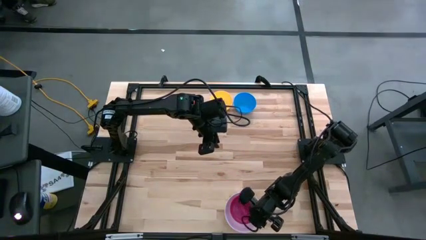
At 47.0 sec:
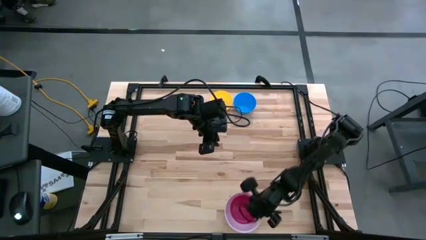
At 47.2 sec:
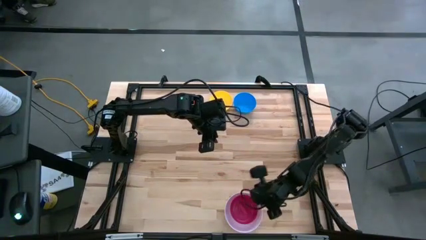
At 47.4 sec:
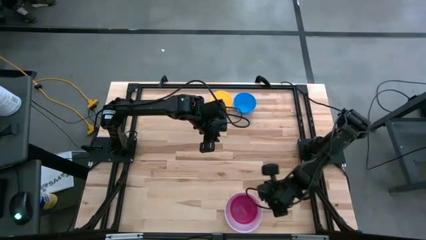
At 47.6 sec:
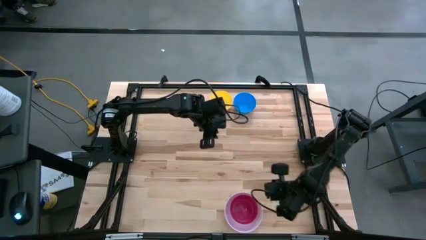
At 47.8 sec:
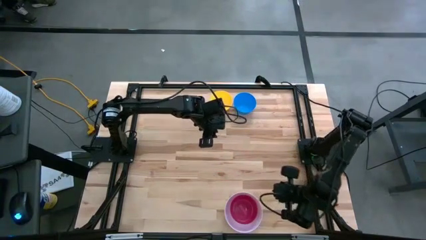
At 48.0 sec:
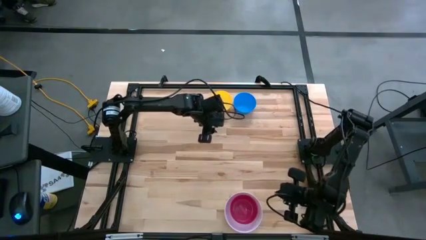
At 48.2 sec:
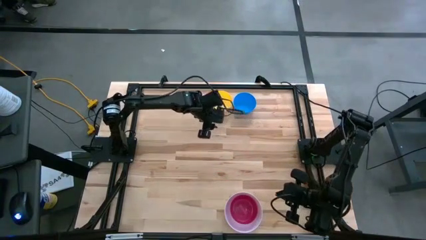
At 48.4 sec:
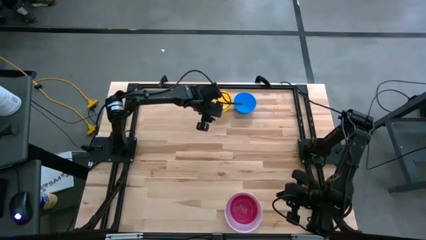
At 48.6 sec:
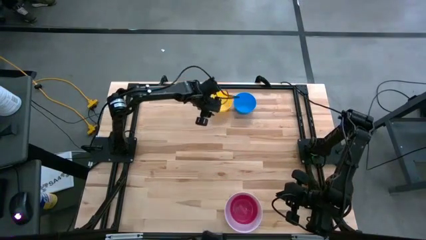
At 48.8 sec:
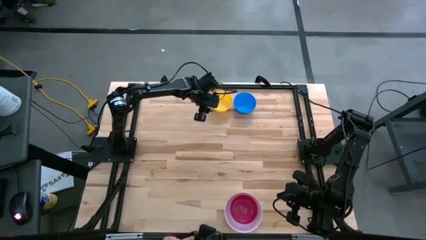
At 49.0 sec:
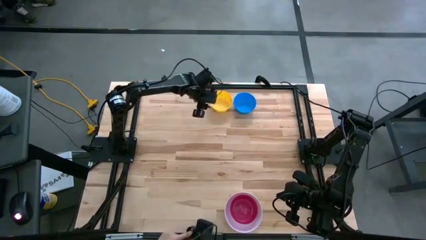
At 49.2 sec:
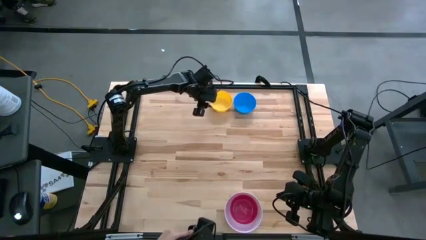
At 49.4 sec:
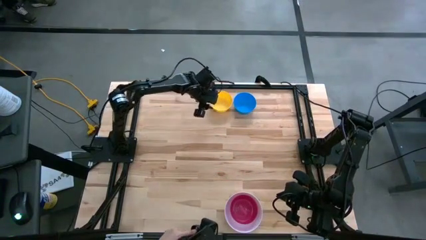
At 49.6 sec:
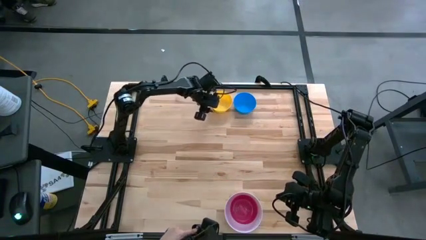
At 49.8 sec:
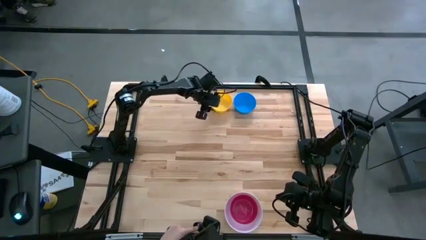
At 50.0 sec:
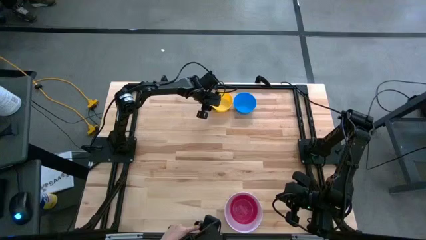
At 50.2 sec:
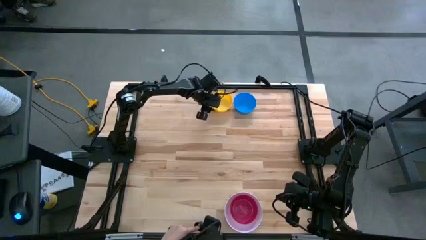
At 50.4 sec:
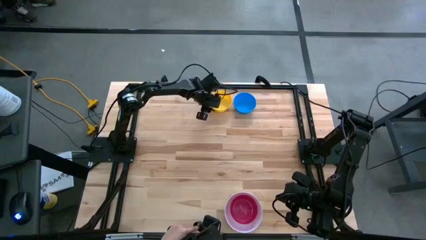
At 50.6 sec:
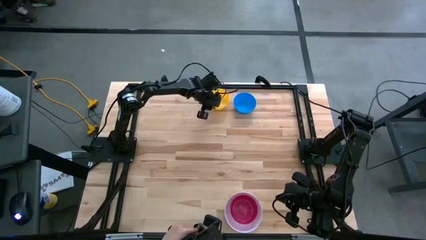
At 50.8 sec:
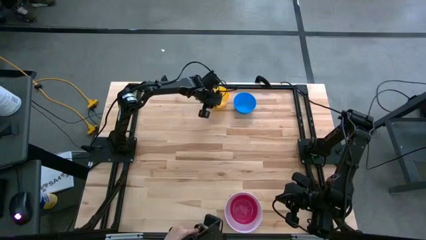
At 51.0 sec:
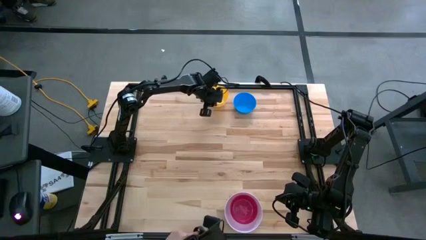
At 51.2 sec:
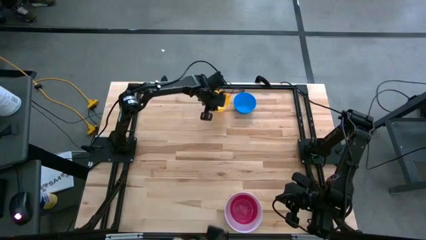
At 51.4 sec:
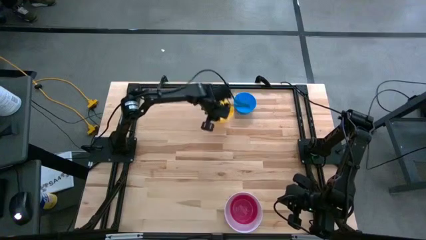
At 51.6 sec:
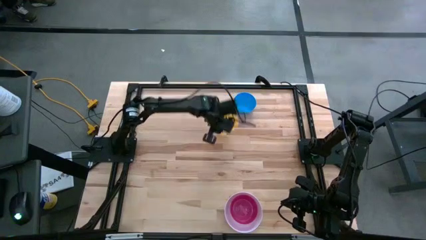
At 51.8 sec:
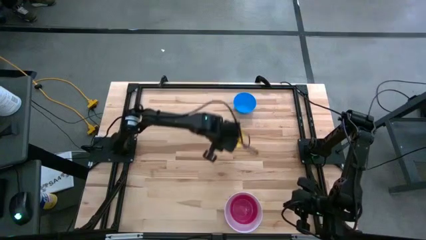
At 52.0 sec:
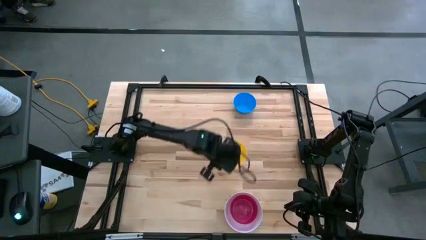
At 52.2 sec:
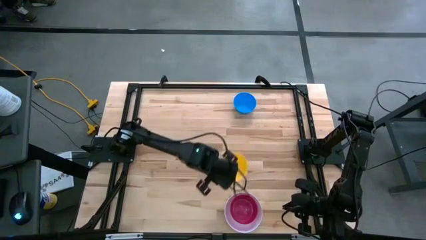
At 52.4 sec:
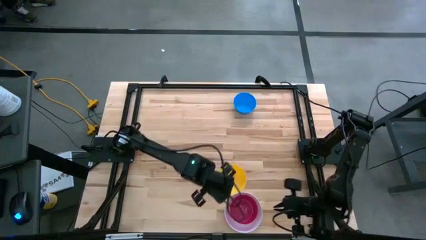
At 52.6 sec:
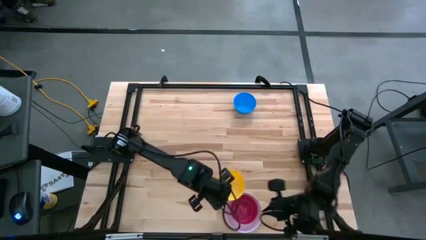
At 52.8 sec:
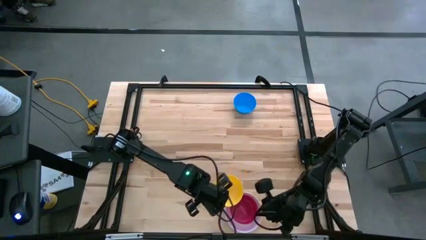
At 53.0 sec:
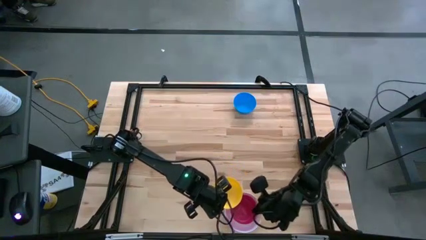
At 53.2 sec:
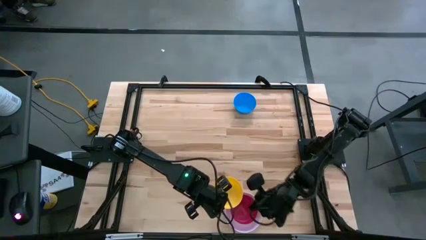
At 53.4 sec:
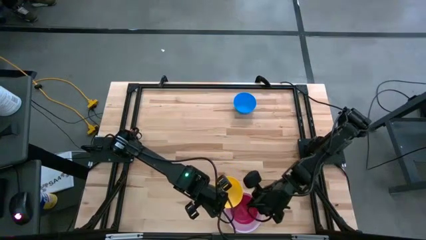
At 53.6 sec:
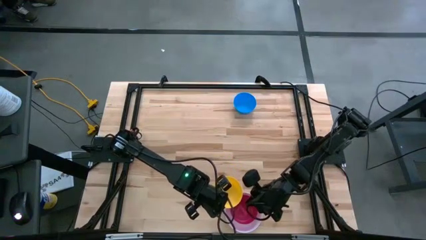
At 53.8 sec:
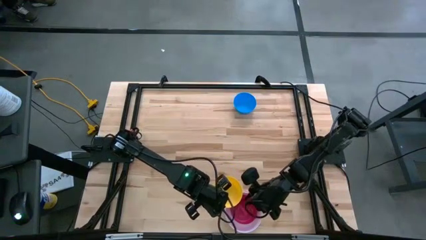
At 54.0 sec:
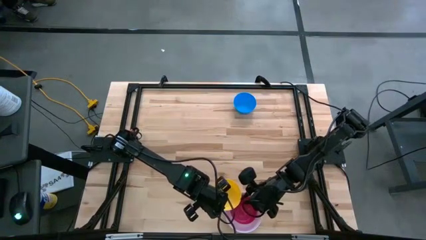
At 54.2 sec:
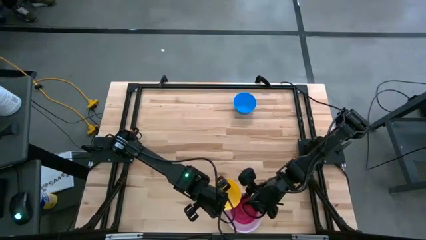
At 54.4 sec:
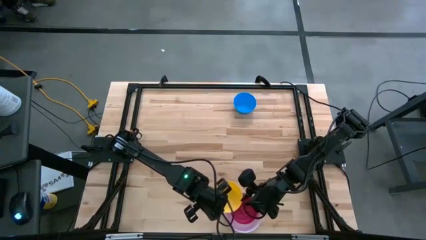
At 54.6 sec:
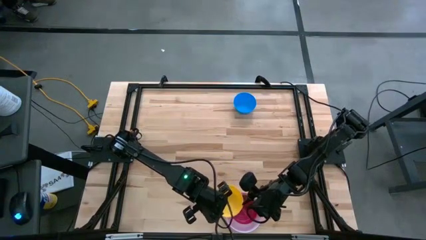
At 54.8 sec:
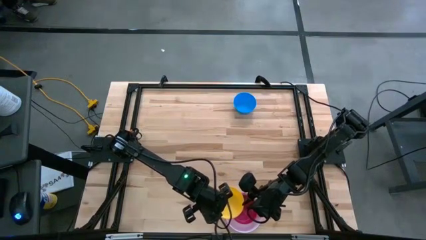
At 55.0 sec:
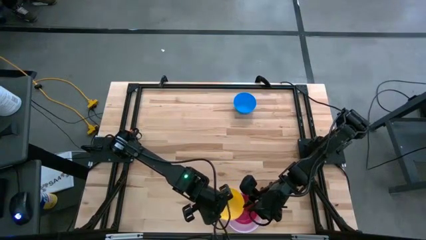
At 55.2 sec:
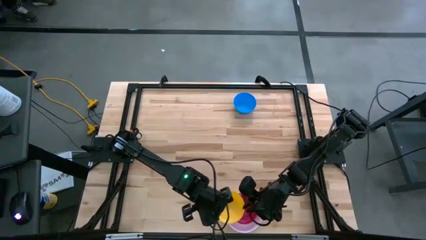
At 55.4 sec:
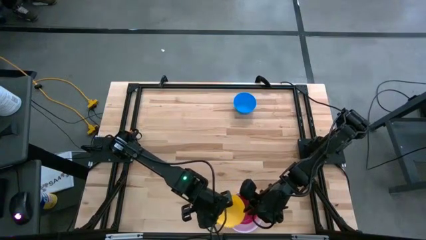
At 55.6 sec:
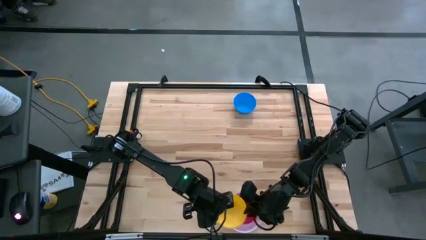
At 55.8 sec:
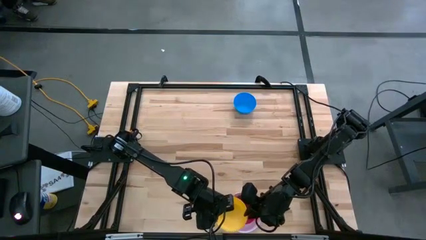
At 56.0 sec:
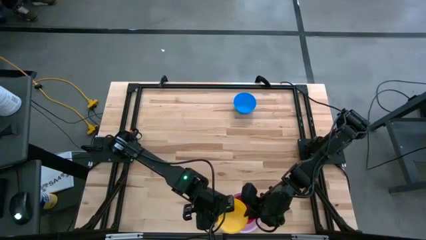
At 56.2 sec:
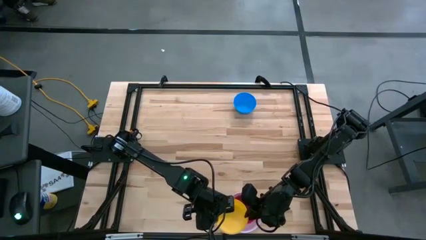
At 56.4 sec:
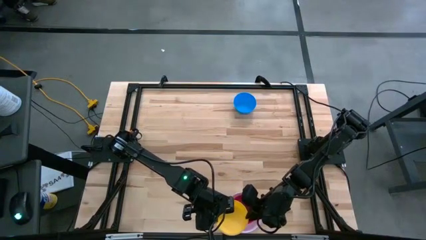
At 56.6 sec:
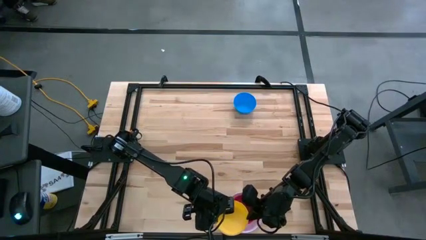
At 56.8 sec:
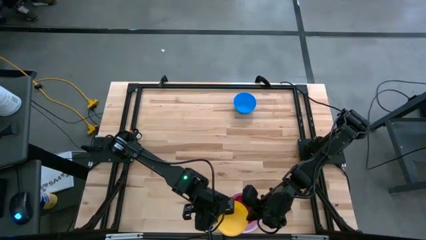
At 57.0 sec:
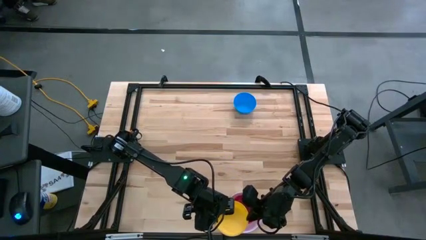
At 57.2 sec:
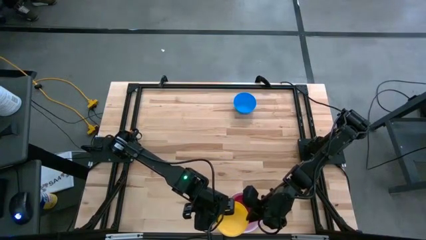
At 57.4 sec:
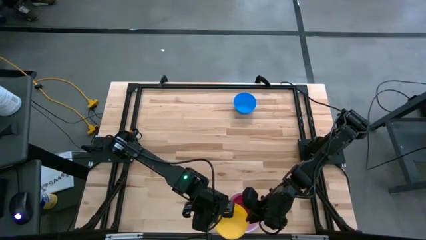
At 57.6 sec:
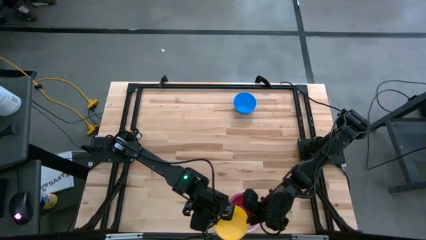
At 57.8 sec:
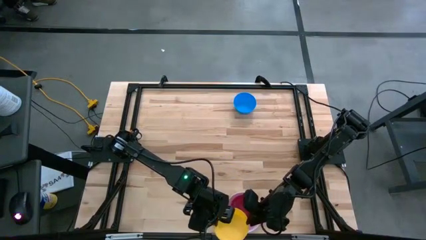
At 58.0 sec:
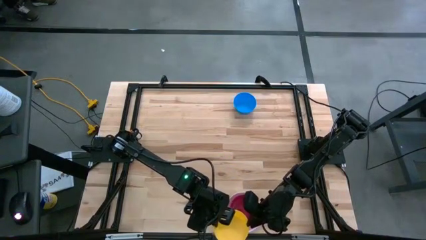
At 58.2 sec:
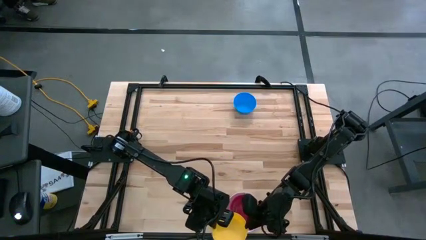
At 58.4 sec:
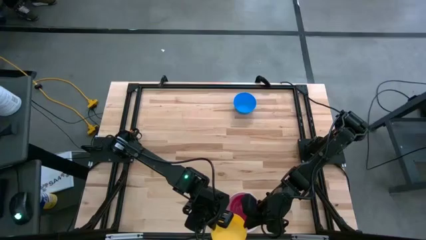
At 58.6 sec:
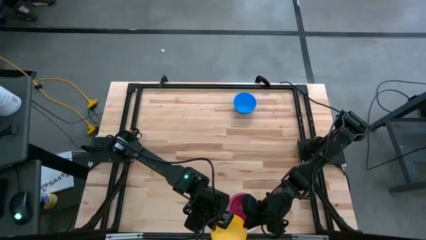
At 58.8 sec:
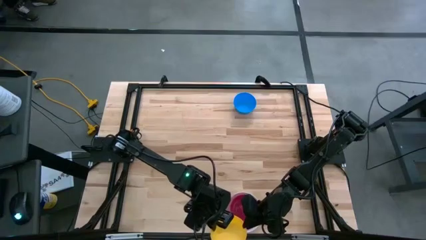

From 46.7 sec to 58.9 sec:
Stack the yellow bowl on the red bowl
